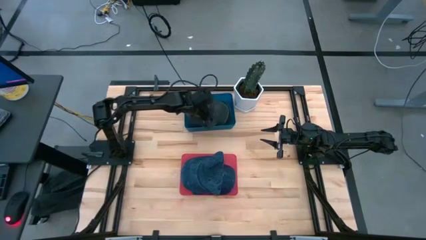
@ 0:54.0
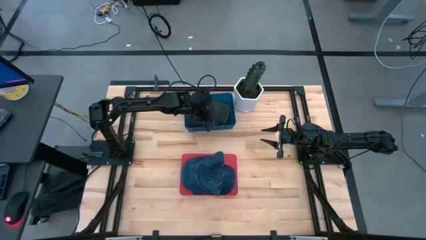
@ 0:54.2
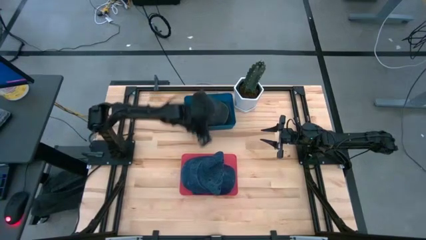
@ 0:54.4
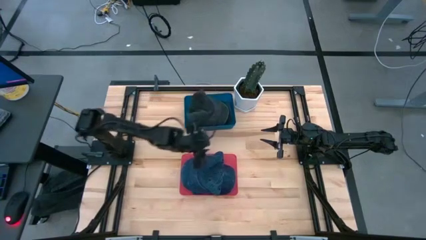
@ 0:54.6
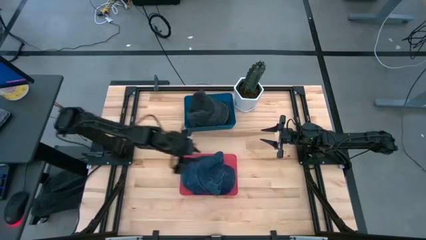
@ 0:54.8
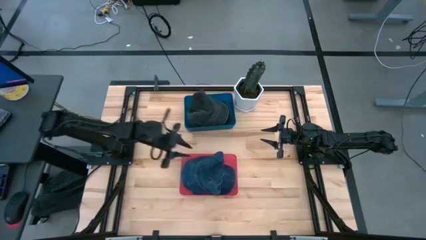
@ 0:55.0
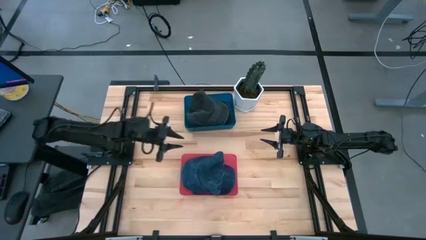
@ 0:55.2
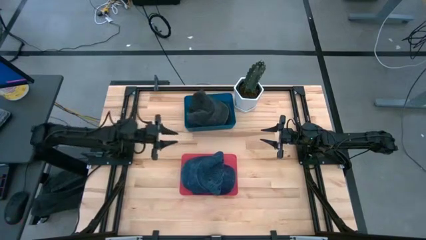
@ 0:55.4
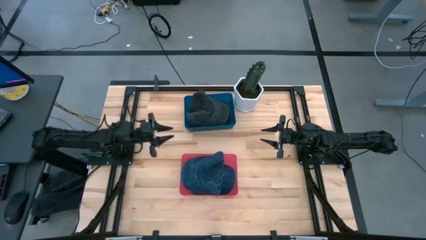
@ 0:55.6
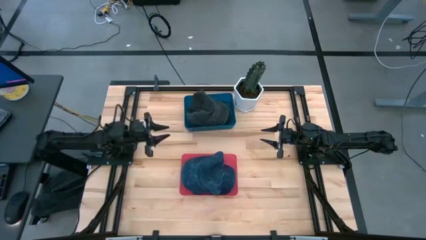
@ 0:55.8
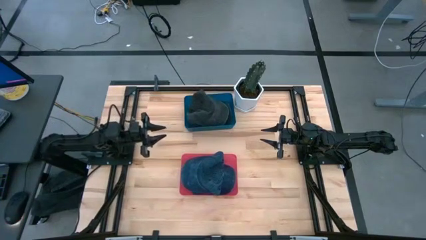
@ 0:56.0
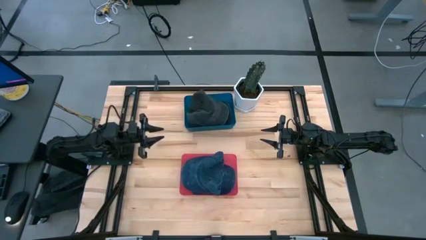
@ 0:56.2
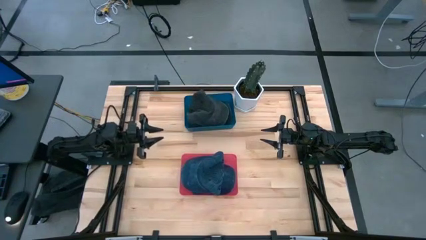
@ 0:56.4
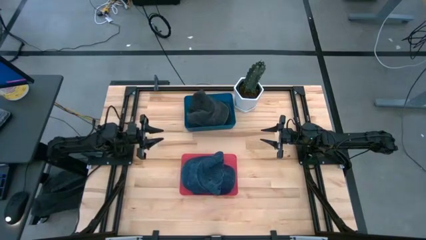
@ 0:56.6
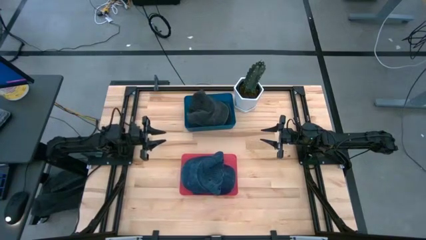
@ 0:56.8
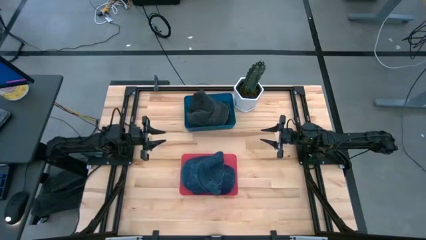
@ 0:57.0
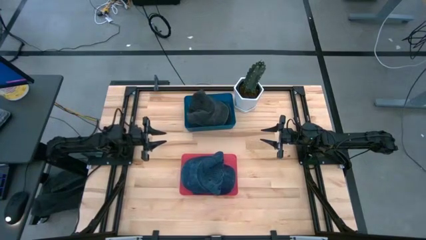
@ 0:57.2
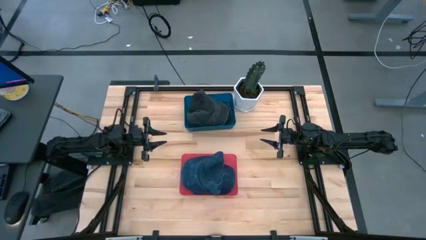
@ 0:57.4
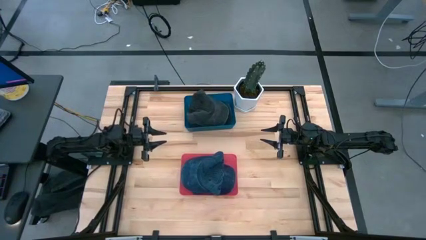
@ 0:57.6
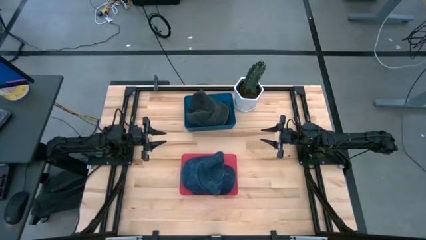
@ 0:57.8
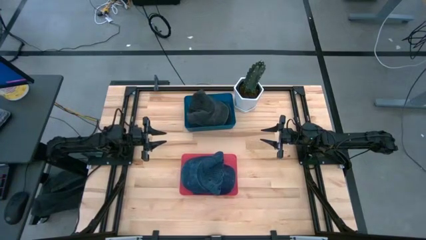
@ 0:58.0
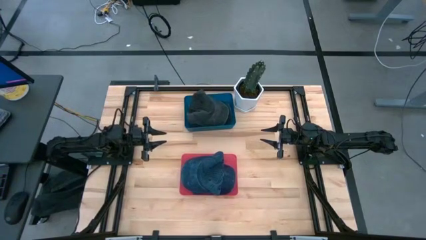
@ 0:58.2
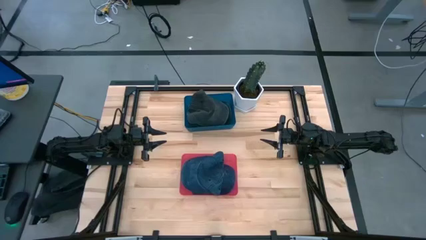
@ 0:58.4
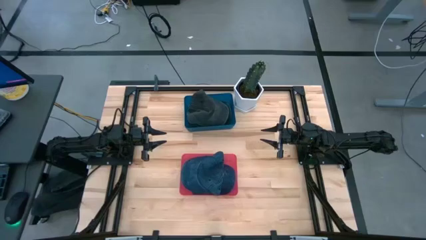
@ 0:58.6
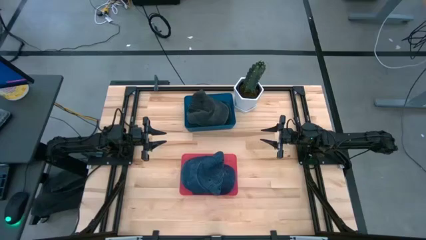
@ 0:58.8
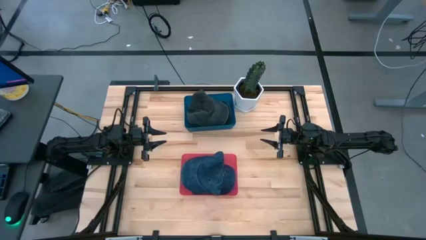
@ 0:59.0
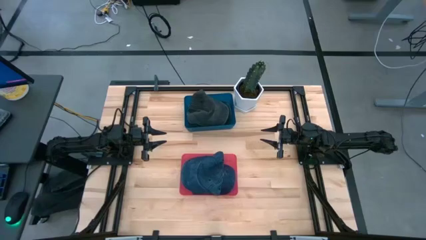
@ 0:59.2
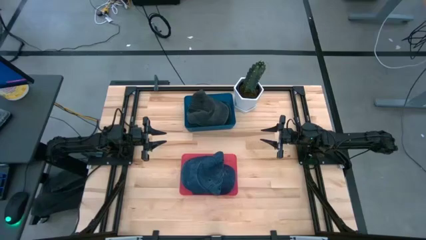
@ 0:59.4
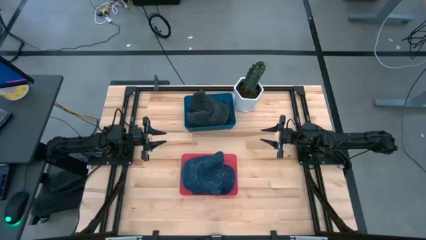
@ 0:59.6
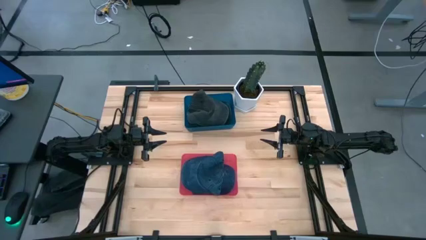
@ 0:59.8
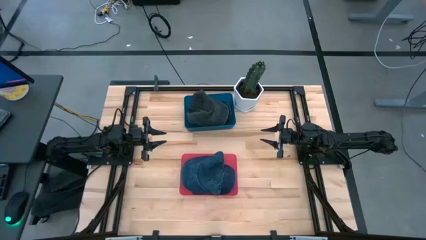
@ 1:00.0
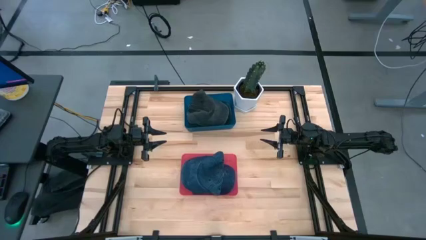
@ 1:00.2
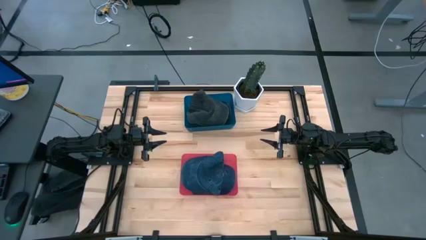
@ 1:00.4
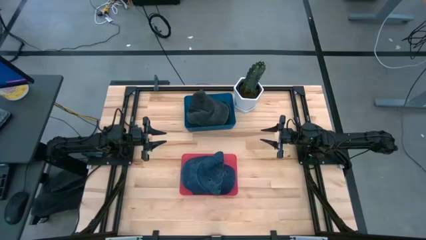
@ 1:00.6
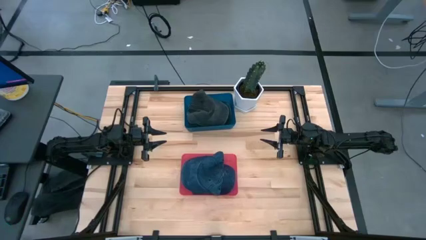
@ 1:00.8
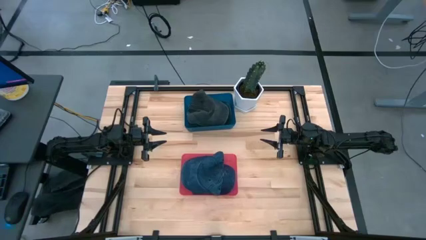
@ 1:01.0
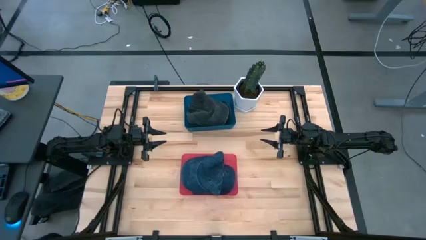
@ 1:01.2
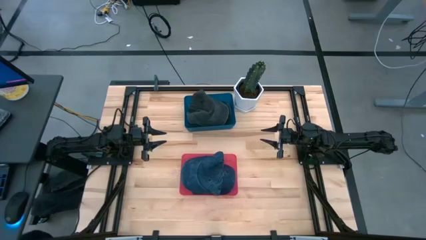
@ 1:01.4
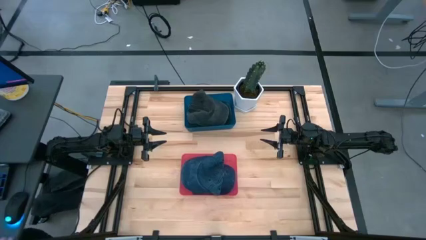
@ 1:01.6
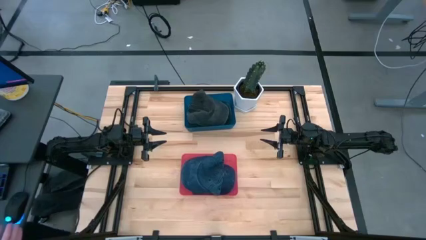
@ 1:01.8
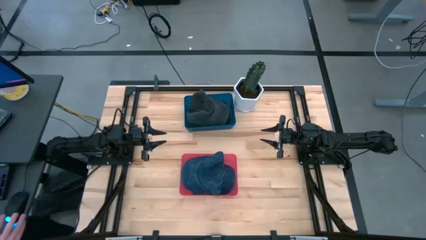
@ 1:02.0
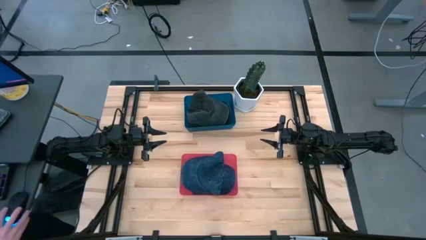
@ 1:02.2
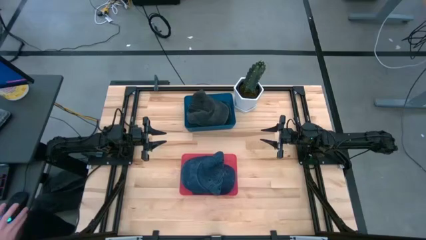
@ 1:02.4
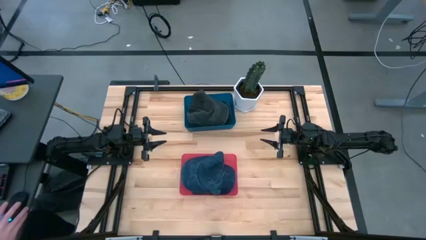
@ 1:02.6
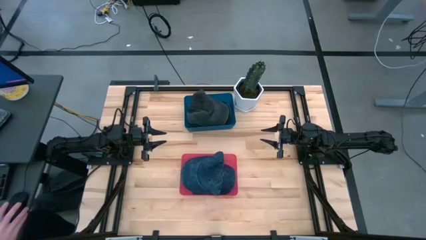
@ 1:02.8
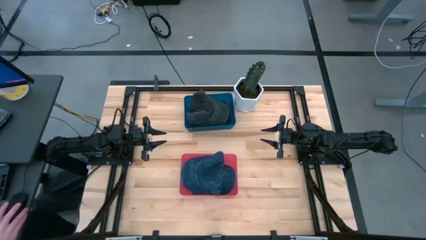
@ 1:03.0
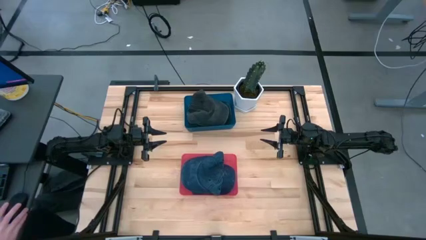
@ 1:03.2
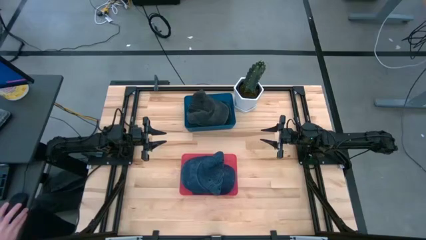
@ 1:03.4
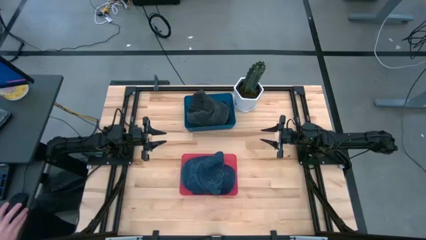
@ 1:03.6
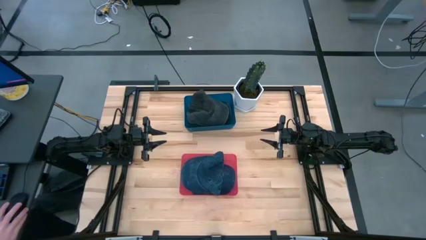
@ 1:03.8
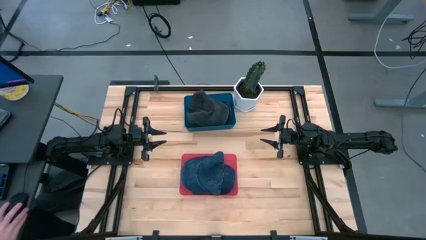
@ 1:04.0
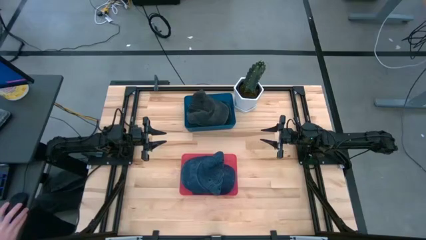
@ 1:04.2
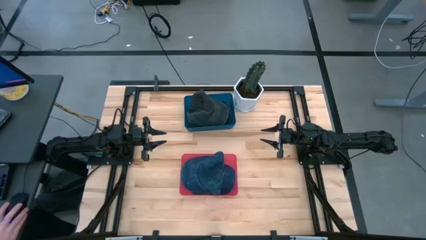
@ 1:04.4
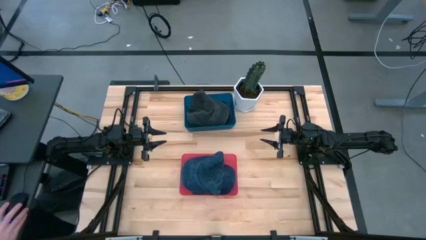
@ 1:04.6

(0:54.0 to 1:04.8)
Task: Pick & Place hat
Return to Home Position
